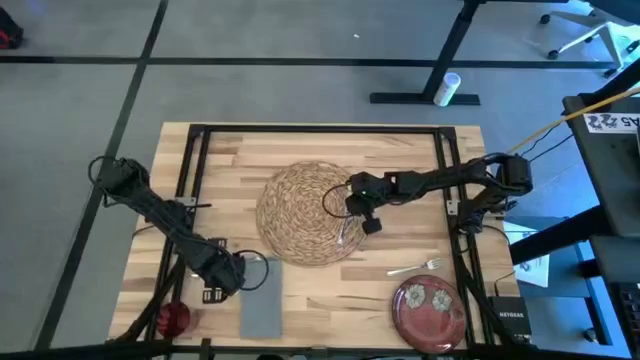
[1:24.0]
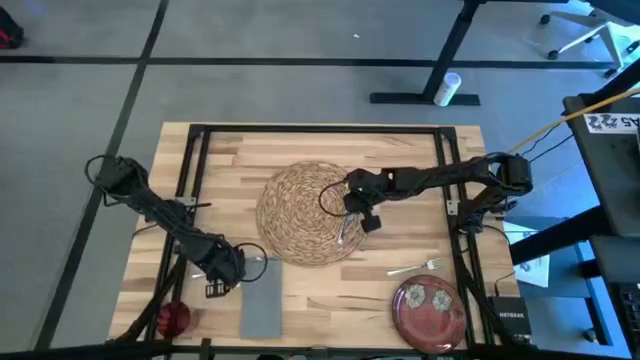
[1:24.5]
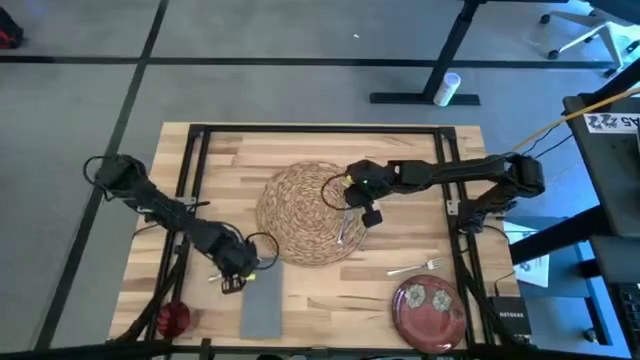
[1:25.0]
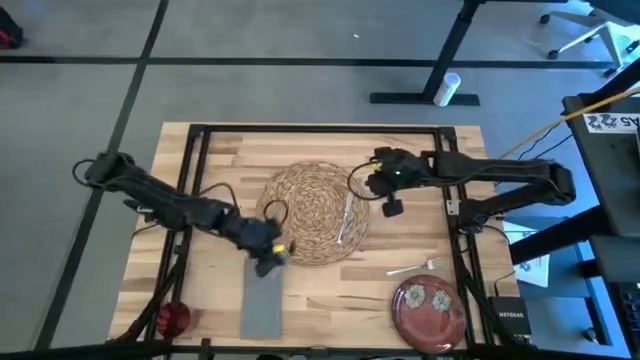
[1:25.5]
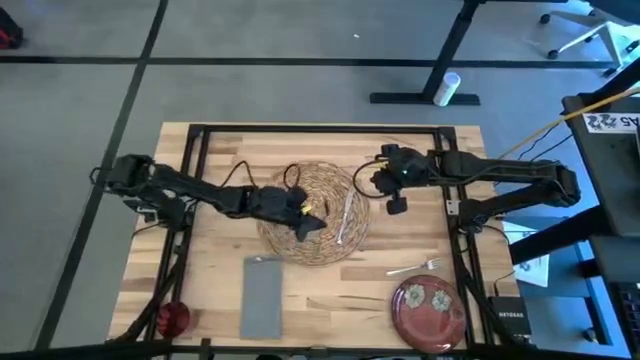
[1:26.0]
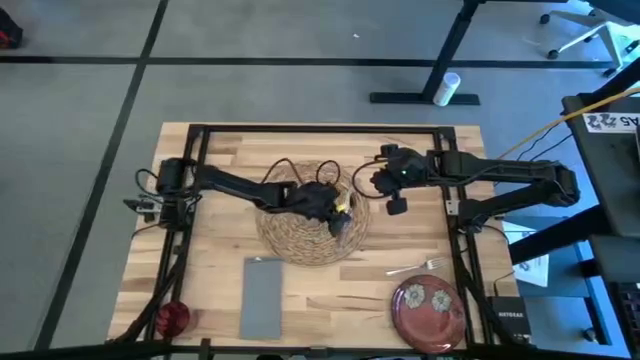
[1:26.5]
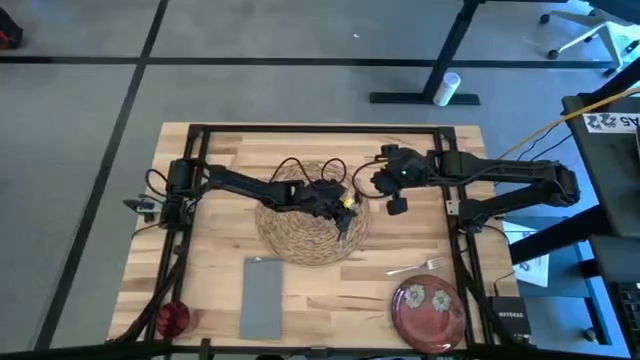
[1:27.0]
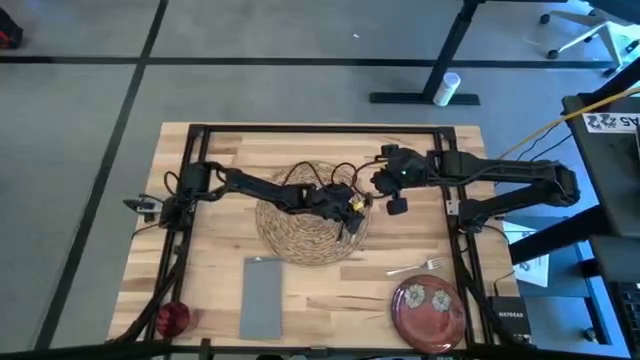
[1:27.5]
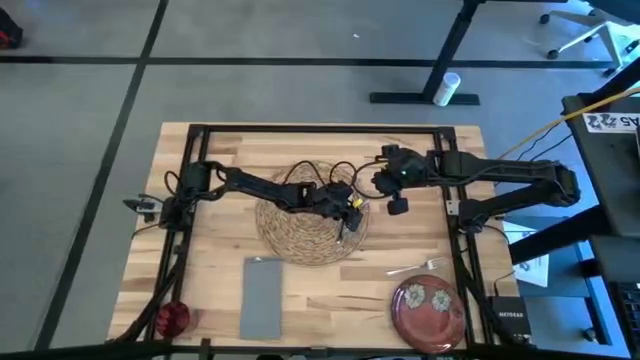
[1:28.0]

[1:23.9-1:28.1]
Task: Set table place
Put the silver spoon to the right of the silver table knife on the brown placemat

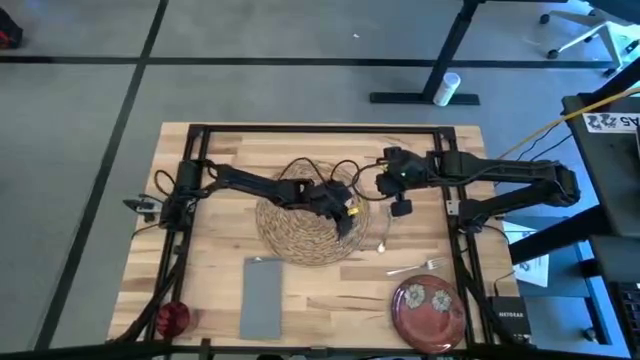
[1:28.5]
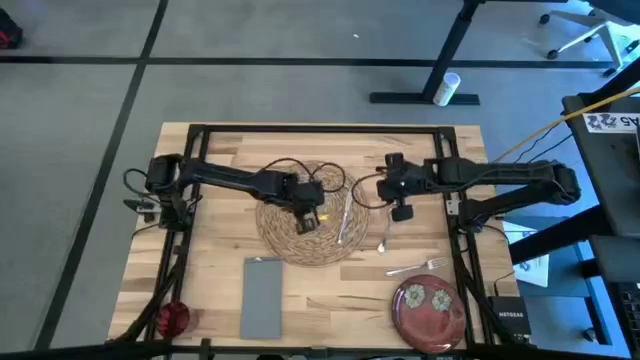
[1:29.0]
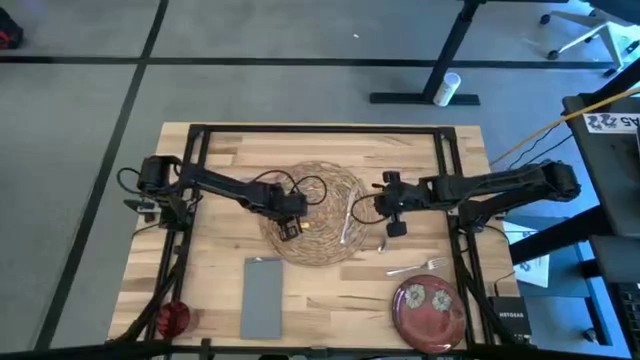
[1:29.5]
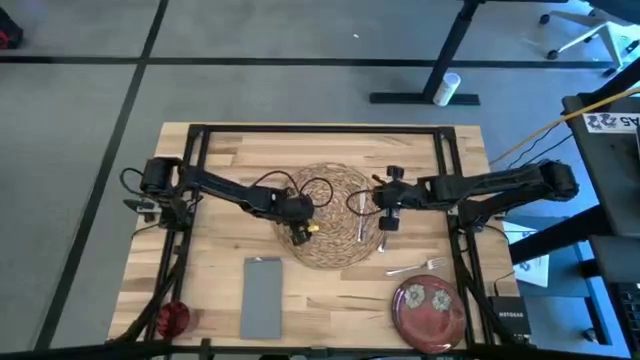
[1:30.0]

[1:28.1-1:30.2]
Adjust the brown placemat

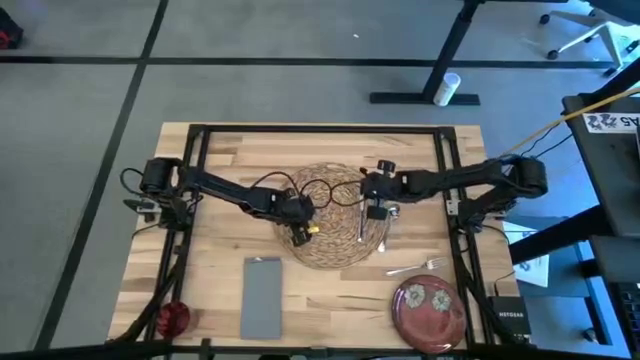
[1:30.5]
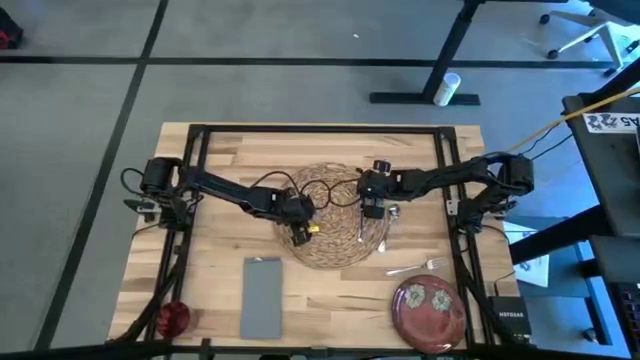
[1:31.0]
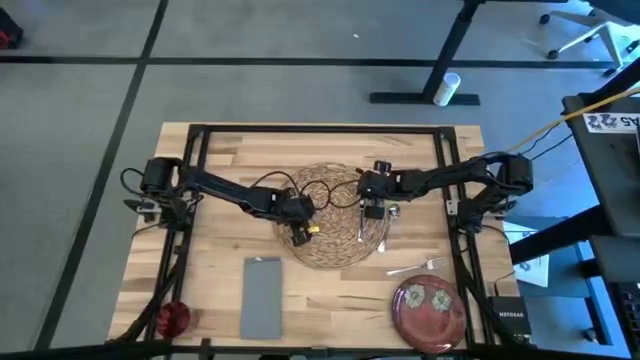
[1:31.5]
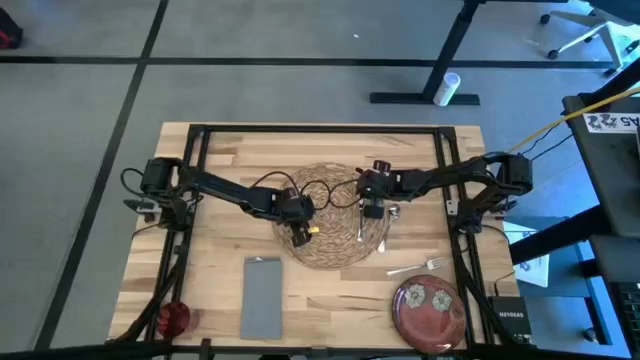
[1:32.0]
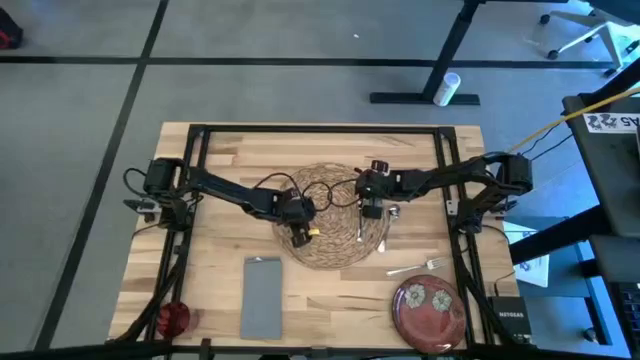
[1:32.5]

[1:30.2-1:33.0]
Adjust the silver table knife on the brown placemat

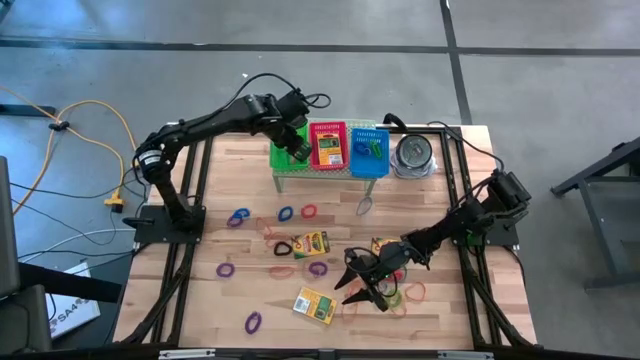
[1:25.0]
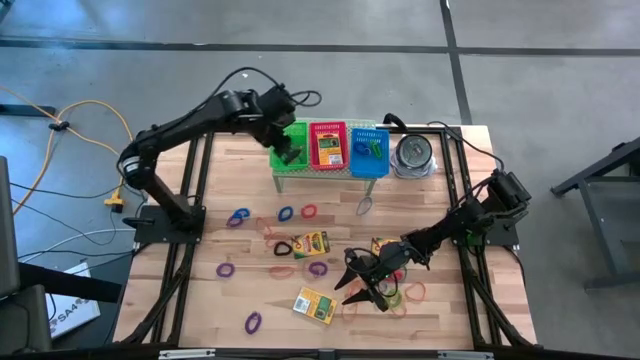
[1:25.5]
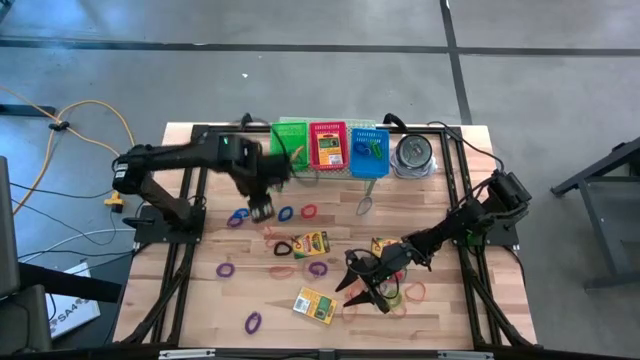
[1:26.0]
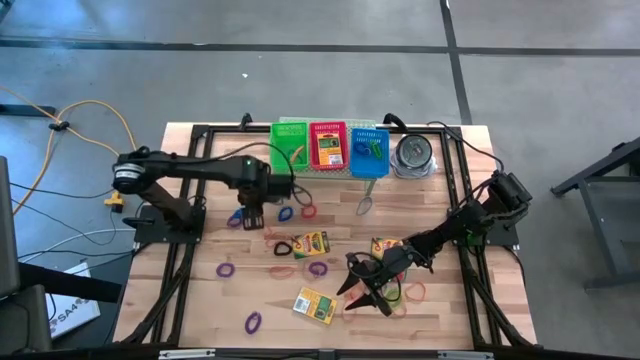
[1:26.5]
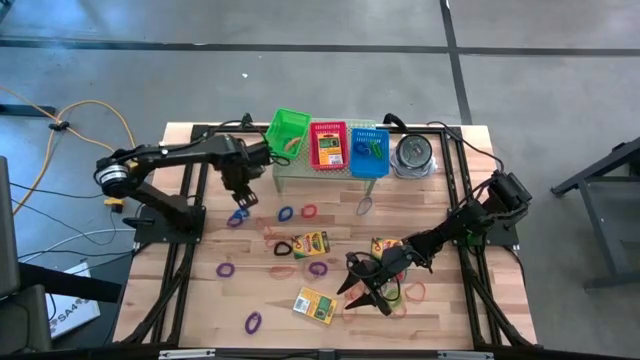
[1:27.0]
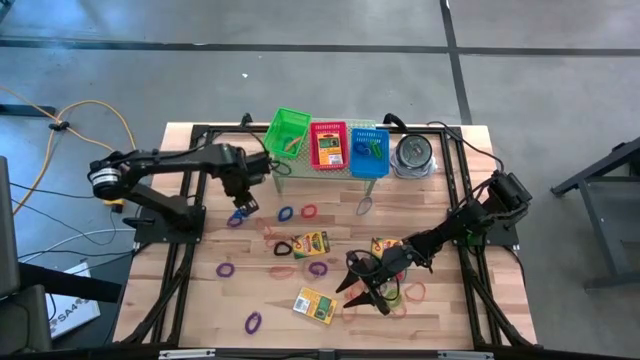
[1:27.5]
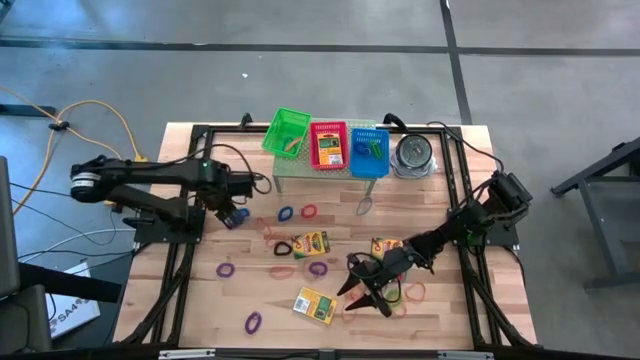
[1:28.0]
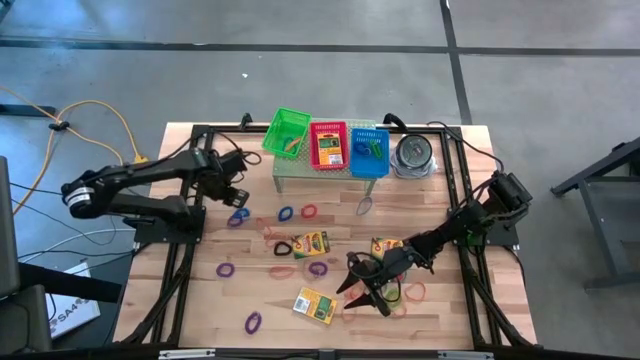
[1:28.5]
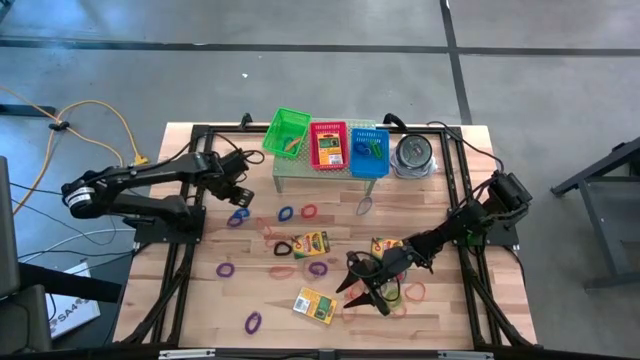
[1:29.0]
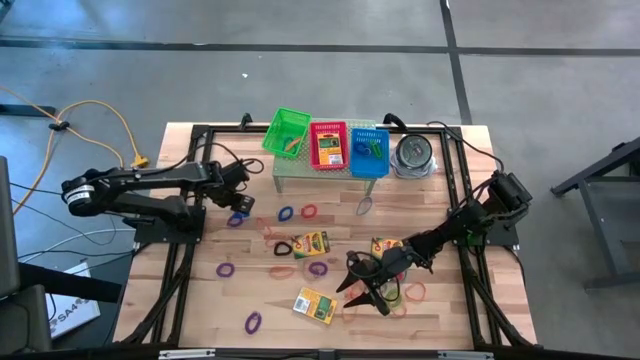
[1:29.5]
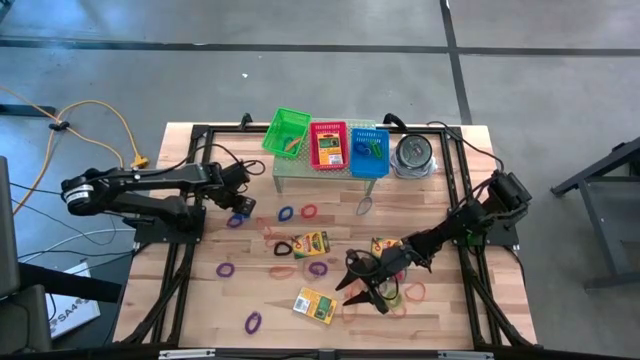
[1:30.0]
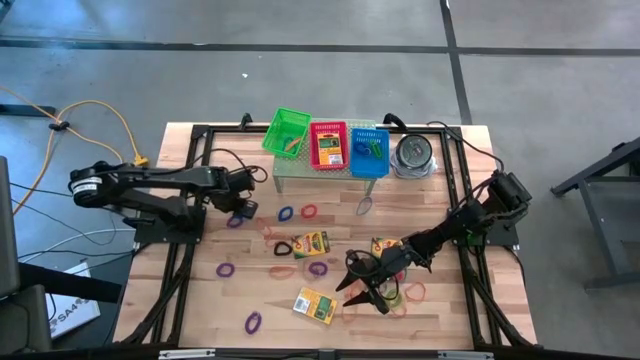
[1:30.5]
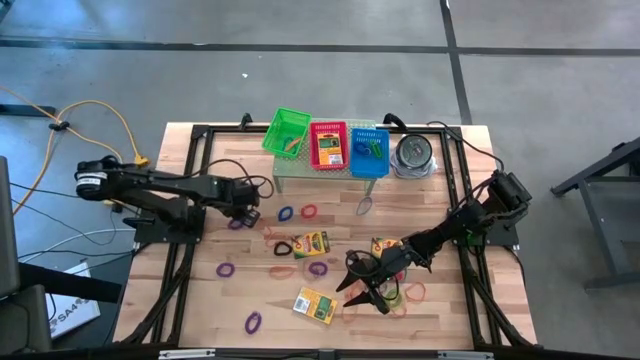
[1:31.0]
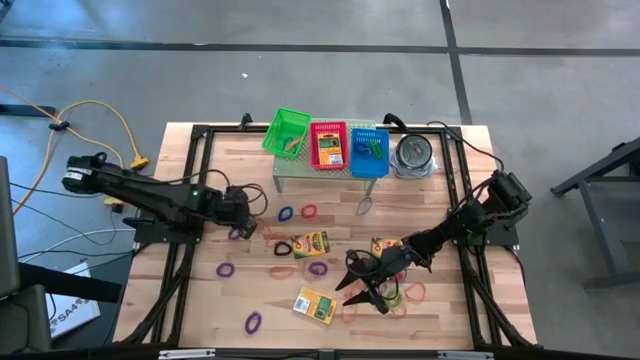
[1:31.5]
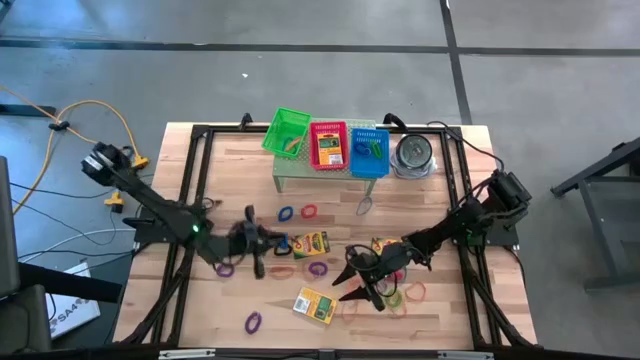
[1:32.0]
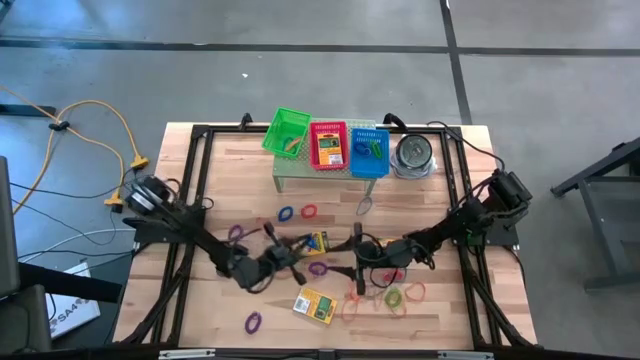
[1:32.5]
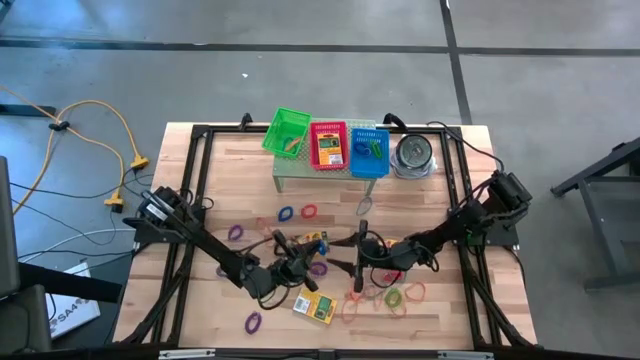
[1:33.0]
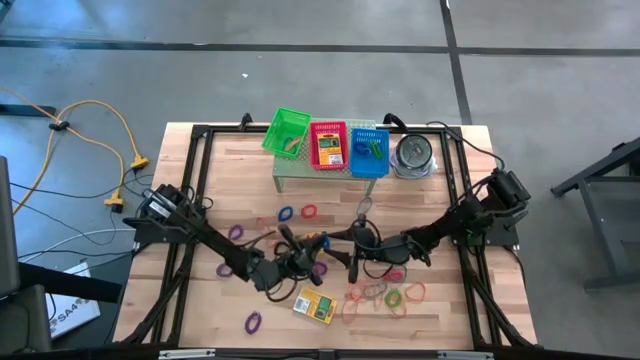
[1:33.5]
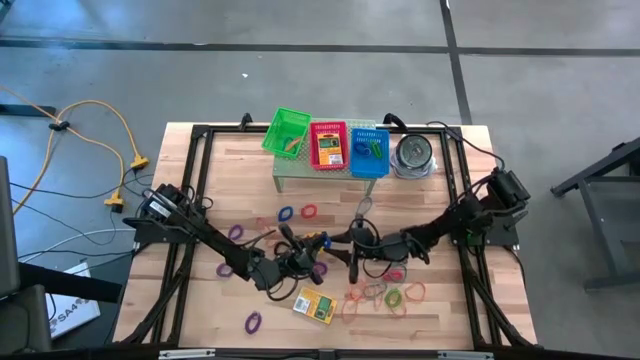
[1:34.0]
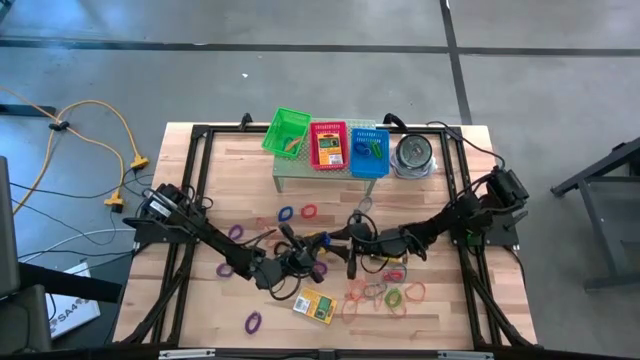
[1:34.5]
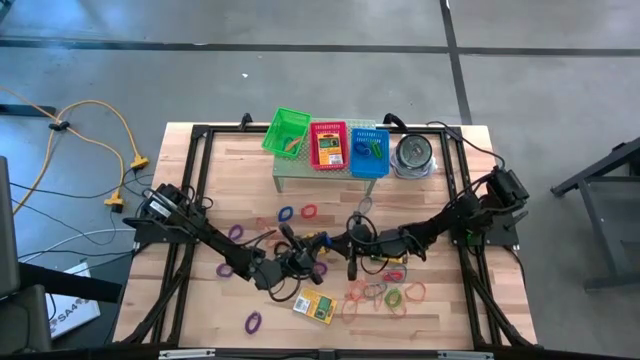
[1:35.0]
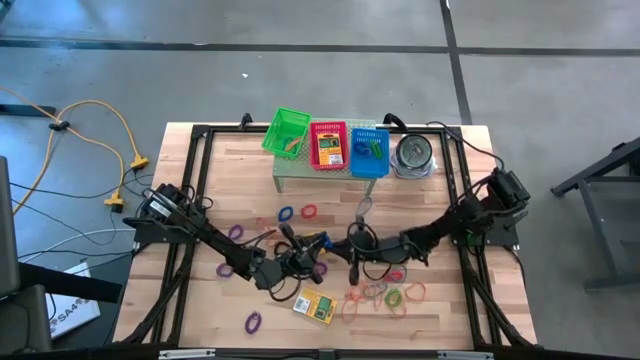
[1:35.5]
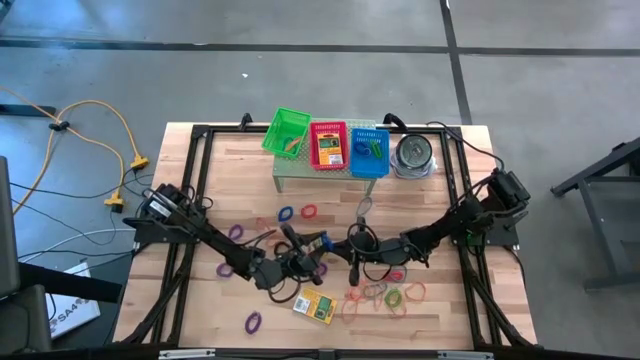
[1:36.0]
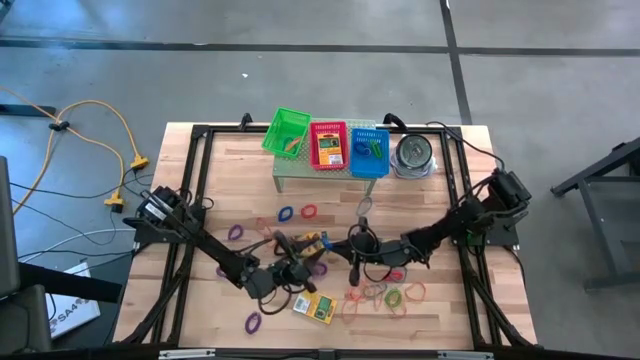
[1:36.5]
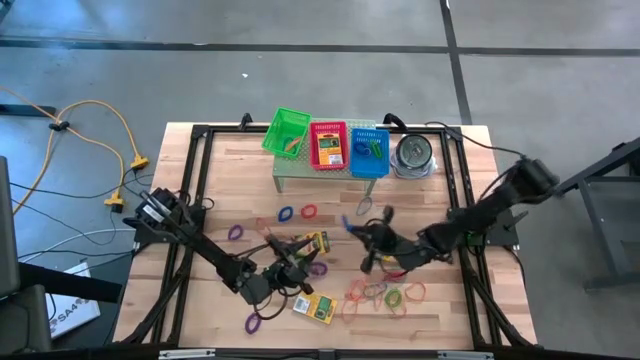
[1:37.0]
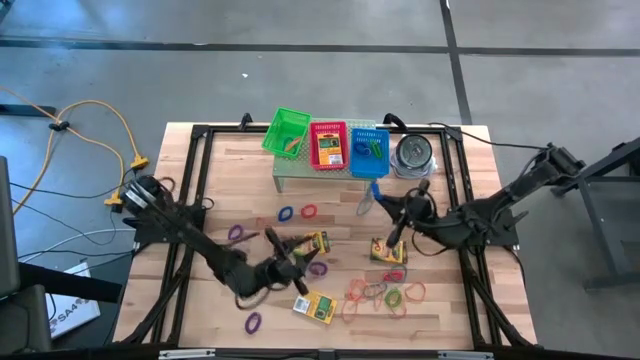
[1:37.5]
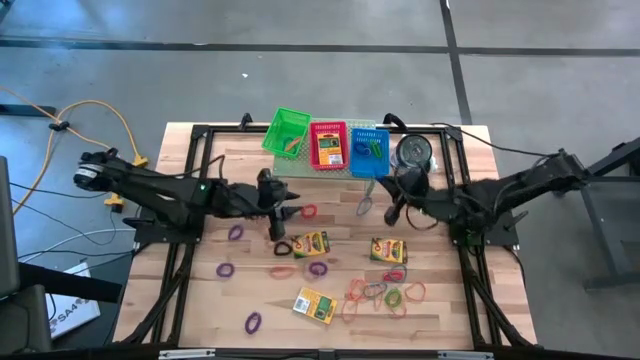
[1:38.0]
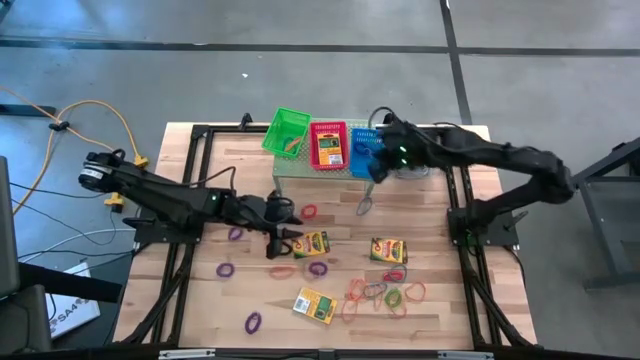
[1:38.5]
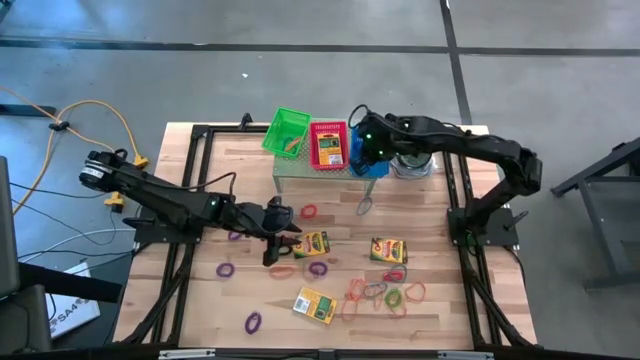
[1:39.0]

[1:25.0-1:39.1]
Task: Pick & Place Office Desk Supplies
Put the left blue spring keychain into the blue bin on the shelf
